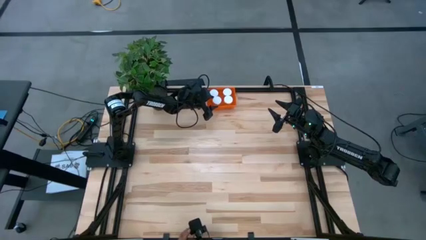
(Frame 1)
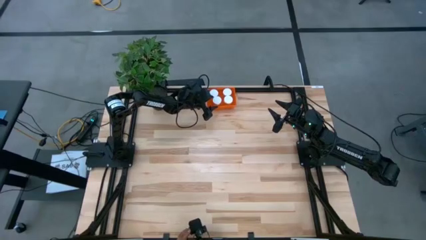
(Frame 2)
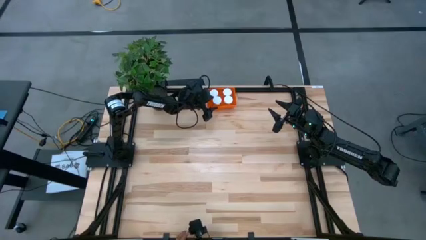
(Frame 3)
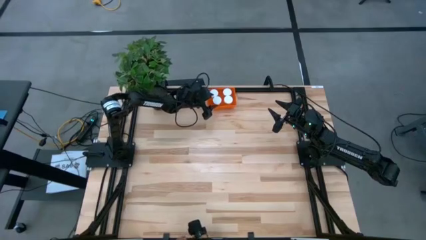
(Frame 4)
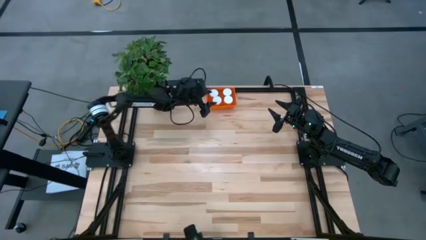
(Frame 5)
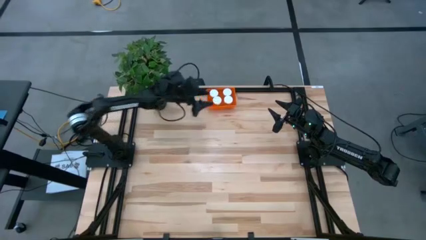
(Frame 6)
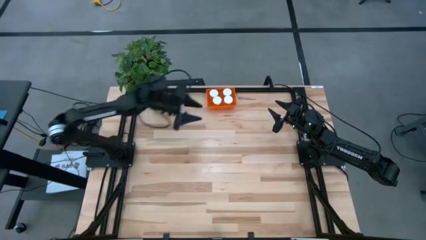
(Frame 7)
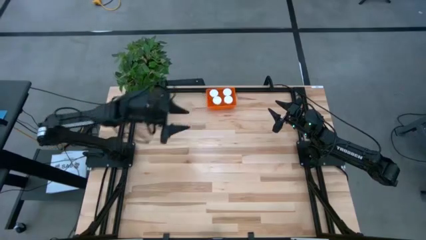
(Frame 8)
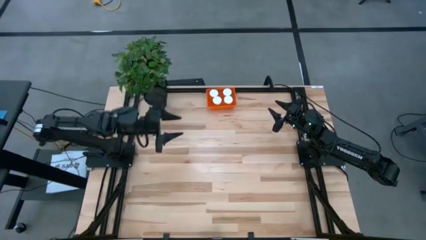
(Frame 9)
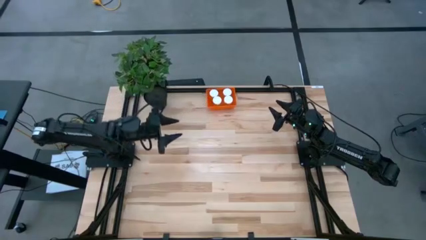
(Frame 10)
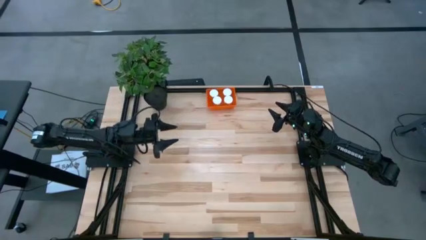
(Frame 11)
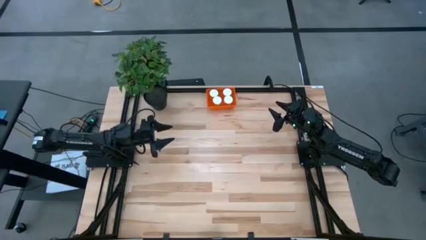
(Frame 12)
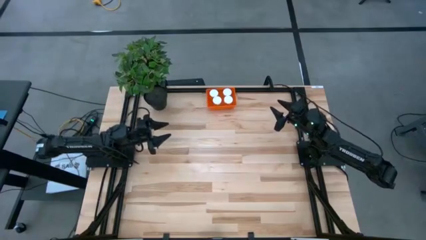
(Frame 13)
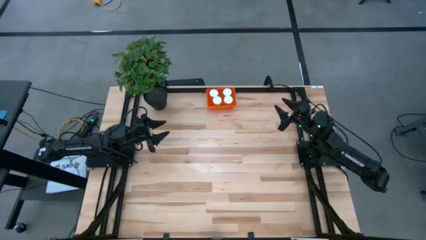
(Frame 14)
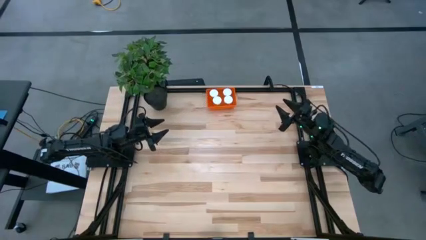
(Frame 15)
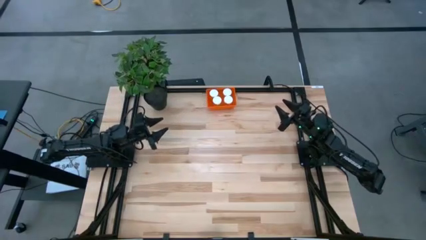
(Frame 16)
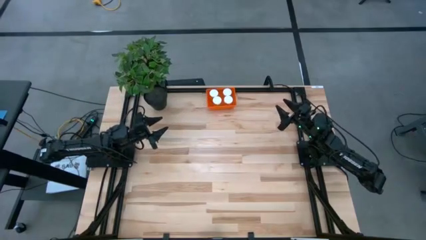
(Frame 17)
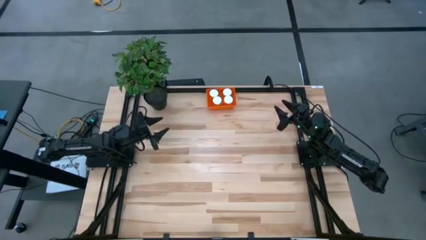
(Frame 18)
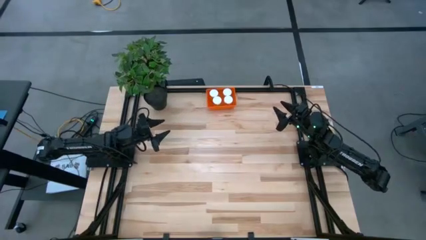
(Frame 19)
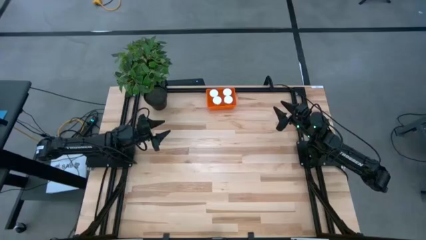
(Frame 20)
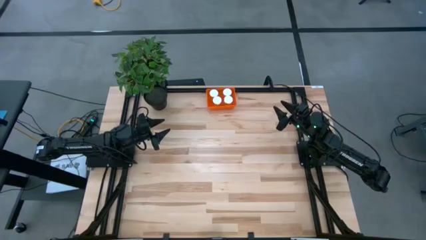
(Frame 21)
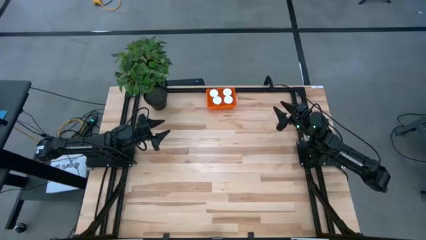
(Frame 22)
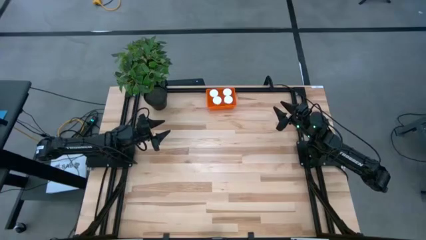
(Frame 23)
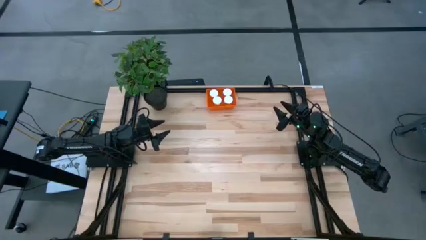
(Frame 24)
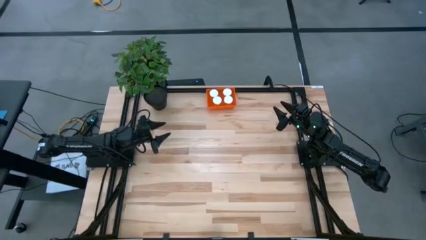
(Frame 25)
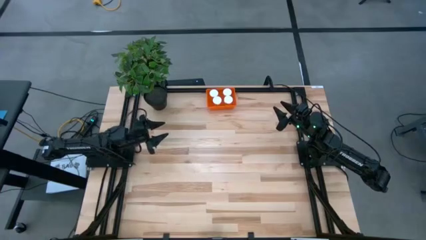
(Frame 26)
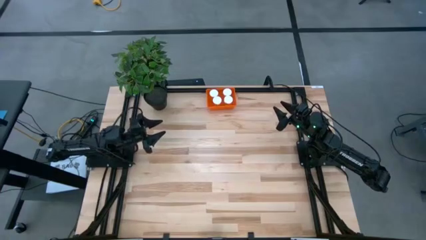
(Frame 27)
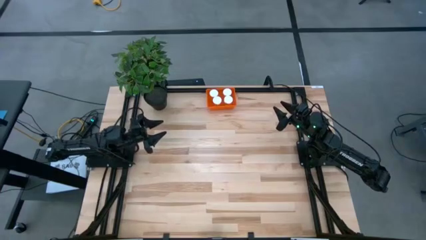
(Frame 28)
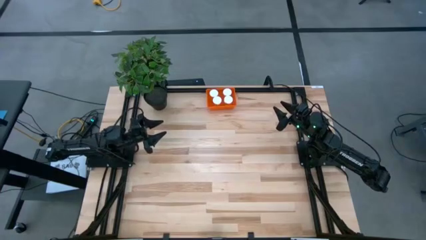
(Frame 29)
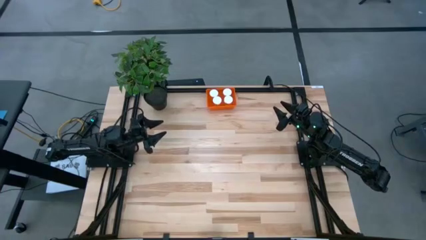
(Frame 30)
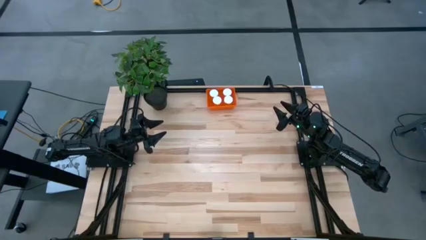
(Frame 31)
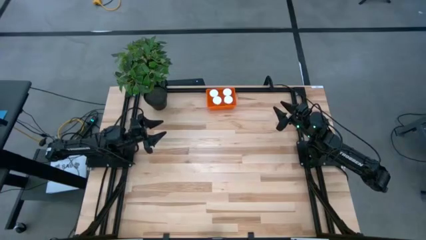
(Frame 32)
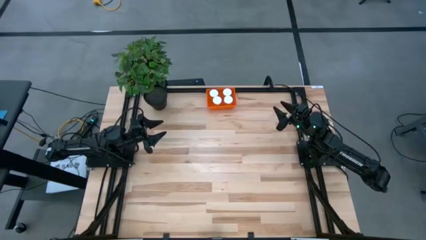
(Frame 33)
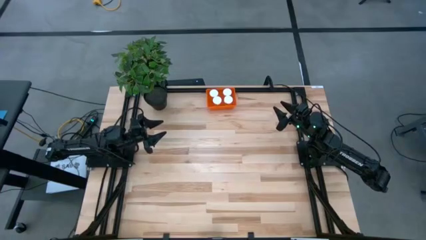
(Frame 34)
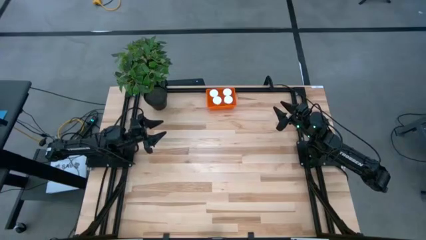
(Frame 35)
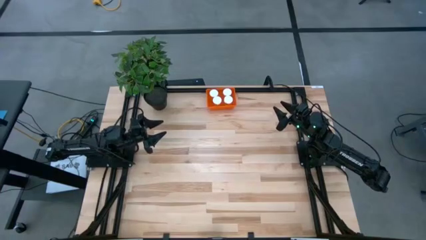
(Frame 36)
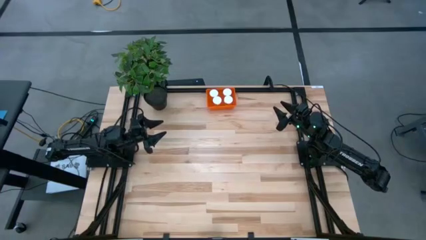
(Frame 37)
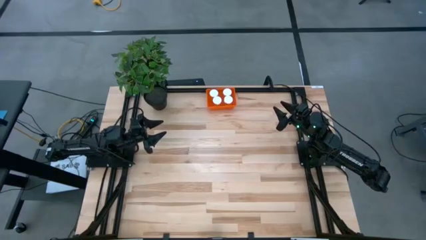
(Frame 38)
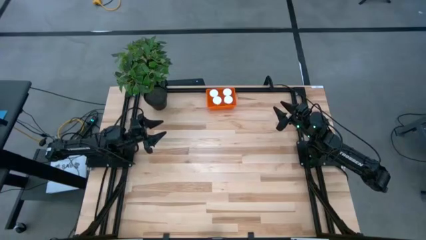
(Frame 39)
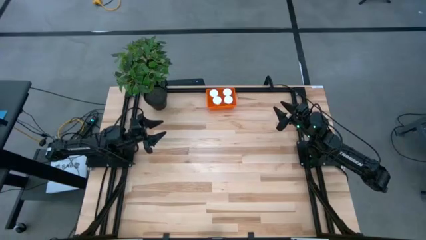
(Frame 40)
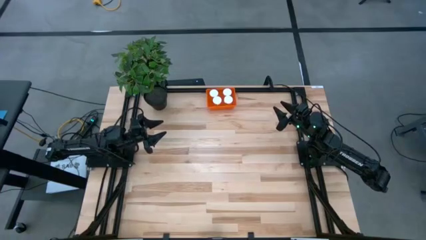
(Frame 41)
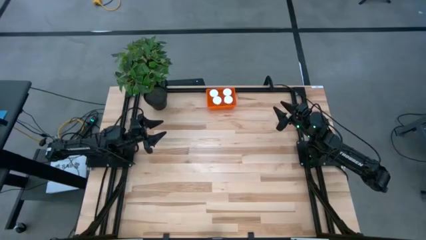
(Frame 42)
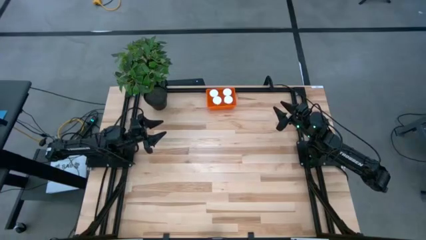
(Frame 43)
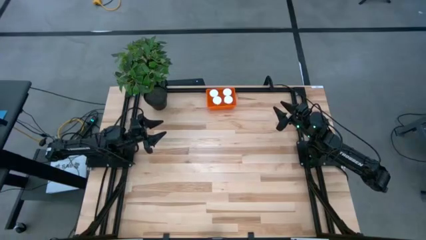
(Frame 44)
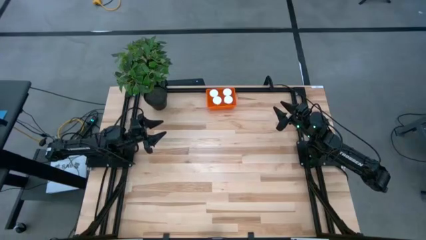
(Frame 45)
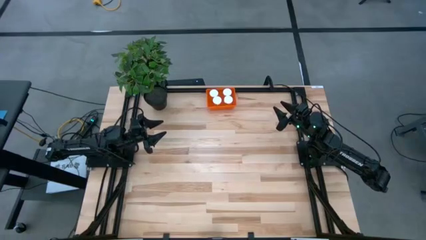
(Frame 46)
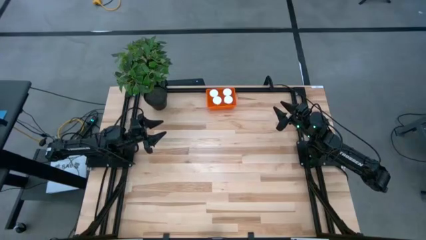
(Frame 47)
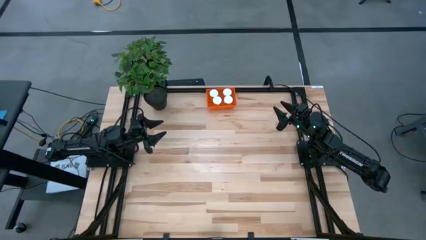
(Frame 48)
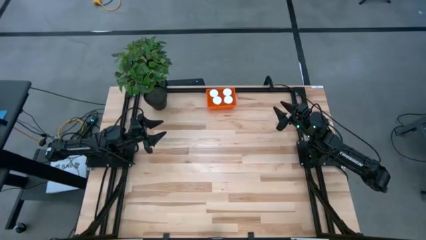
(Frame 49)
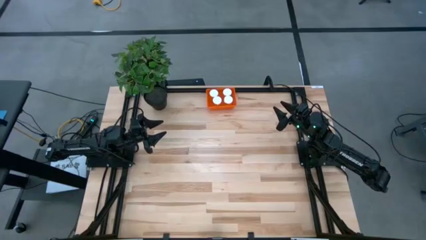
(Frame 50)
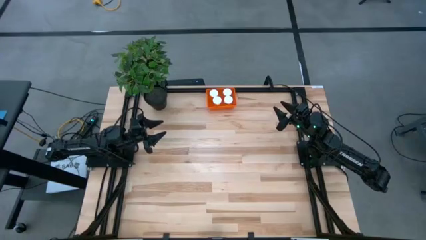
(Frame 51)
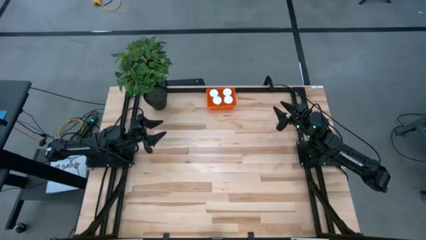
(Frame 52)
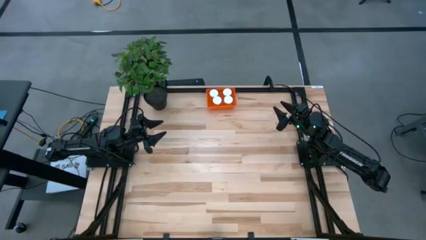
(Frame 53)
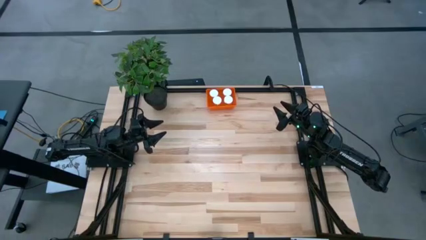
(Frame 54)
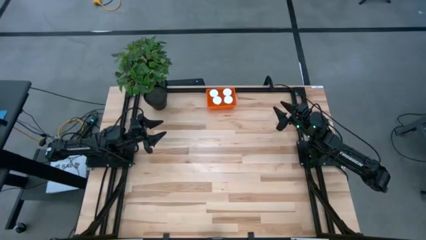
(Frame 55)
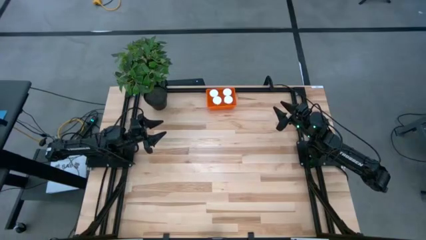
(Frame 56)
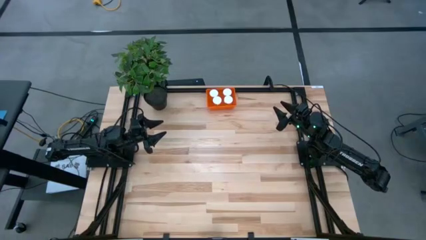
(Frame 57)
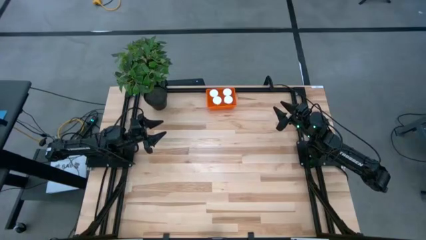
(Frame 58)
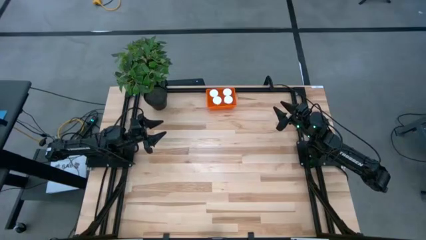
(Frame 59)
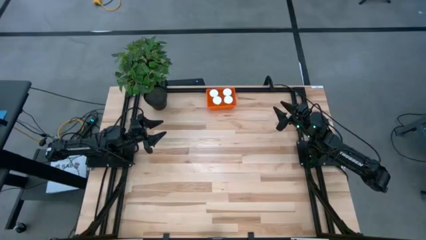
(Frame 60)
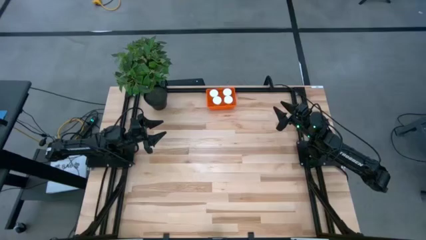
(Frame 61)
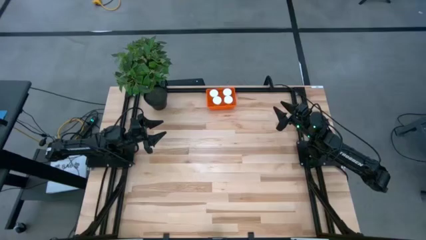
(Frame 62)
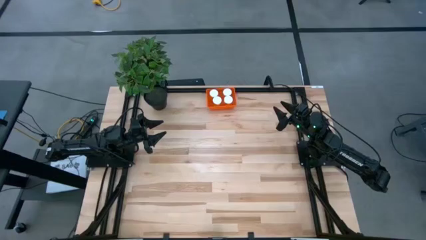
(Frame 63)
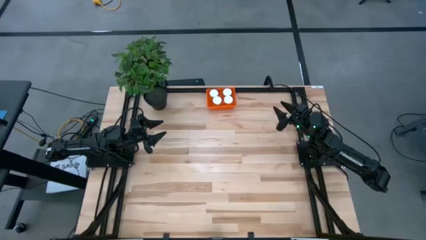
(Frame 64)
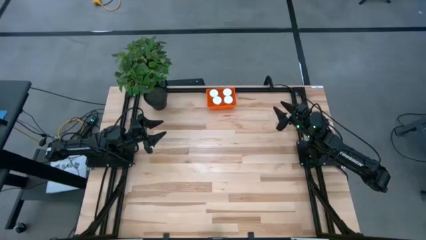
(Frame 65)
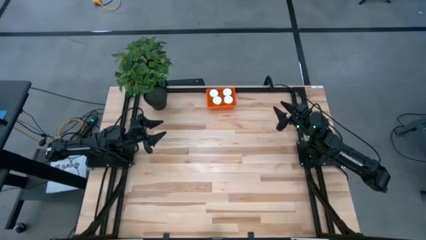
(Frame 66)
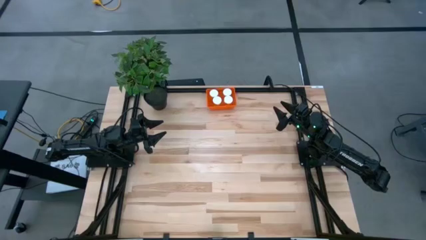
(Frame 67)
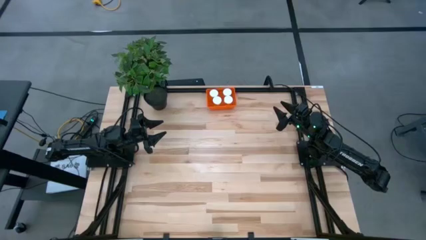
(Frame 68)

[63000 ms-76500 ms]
Task: Pick and place pill bottles into a basket
Return to Home Position

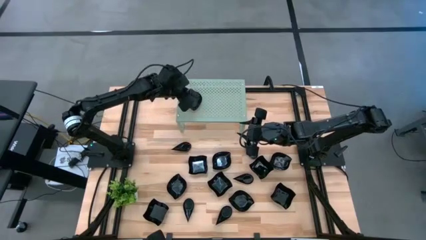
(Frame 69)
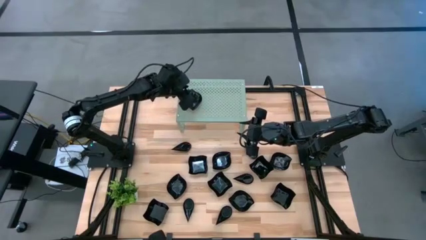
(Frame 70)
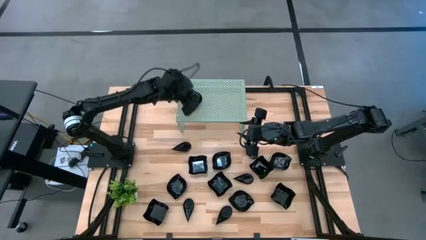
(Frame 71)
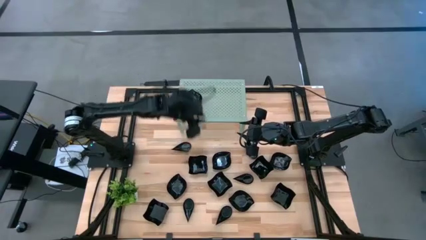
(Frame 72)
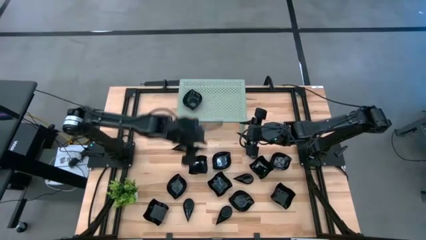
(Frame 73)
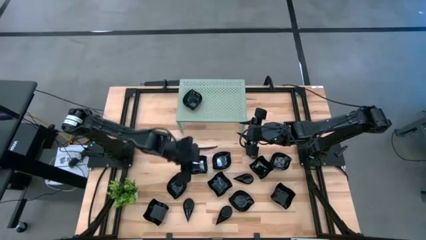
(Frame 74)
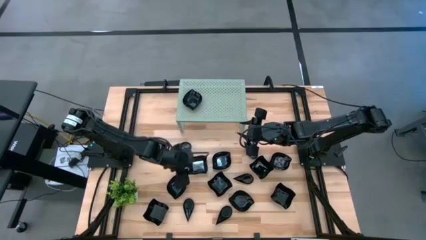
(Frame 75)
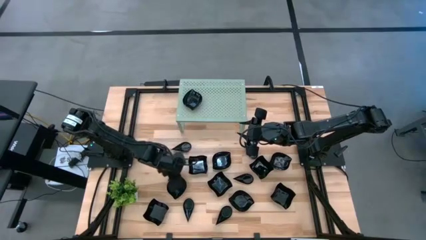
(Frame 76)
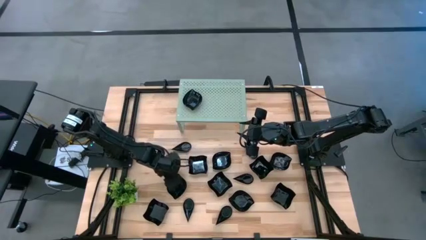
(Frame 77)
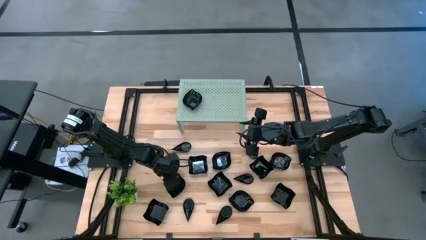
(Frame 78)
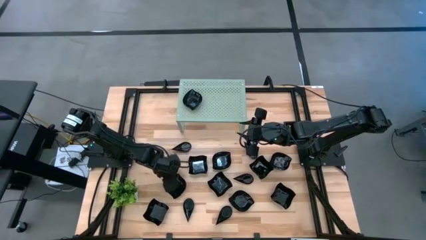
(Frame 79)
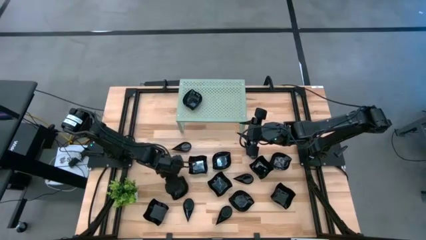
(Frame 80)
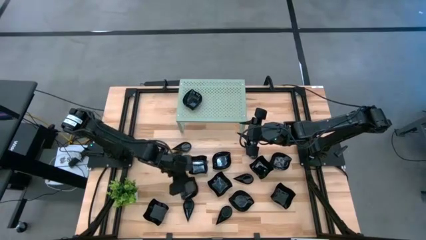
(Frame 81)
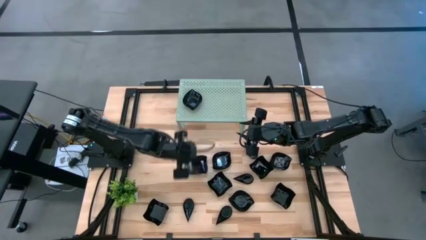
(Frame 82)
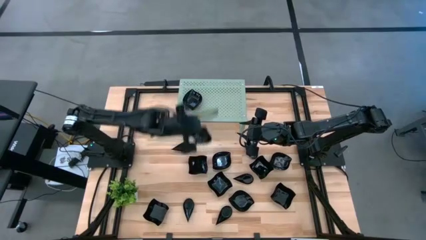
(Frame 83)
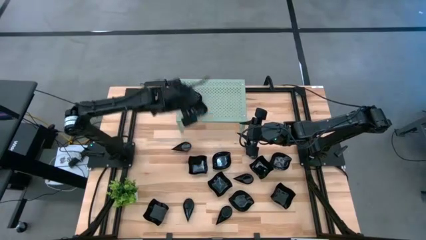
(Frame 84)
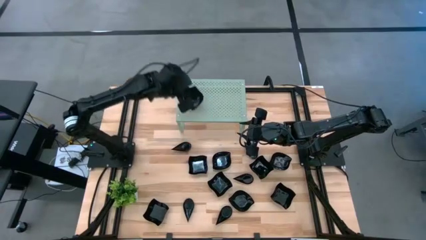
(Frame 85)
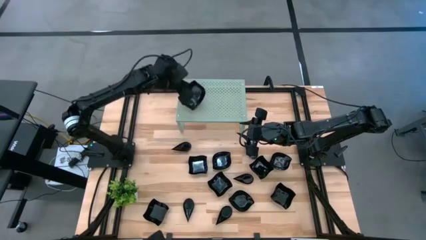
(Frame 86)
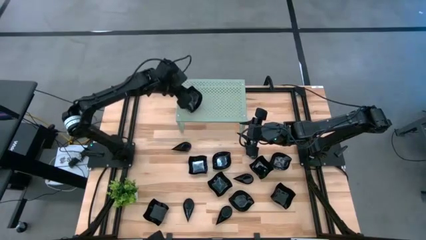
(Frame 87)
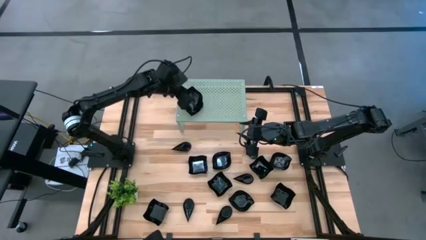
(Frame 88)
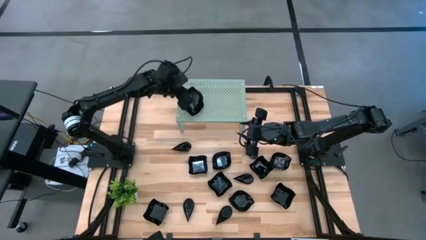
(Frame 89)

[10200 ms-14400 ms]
Task: Pick & Place Mini shaped plates
Stack the leaf-shaped plate on top of the other leaf-shaped plate on the shelf
